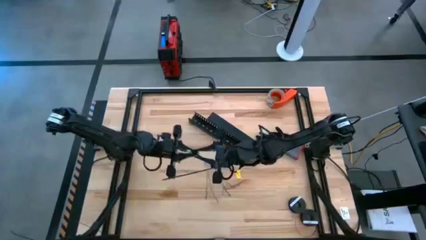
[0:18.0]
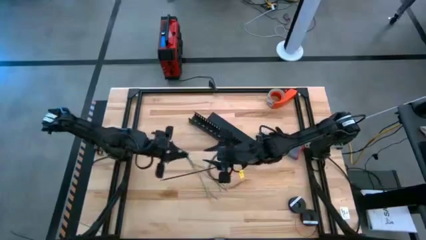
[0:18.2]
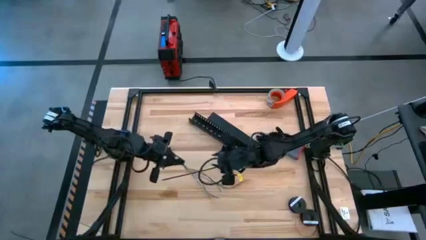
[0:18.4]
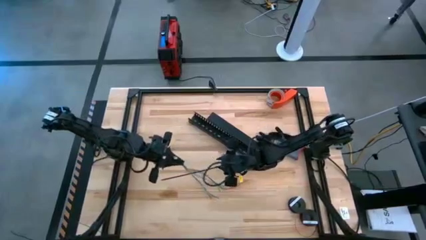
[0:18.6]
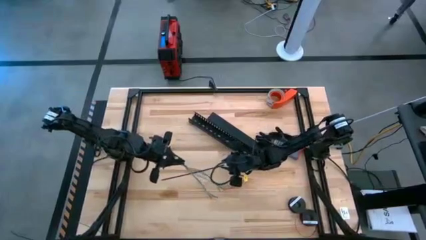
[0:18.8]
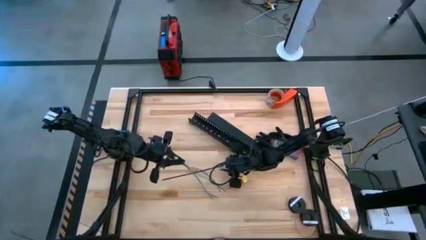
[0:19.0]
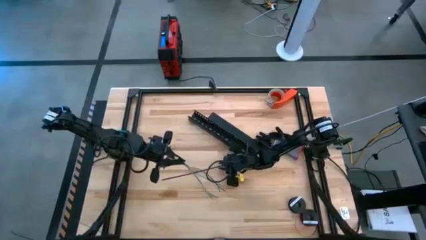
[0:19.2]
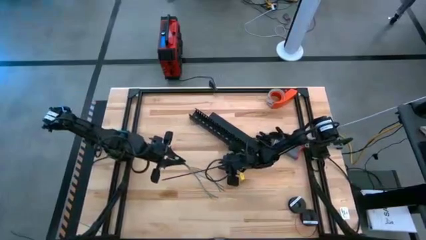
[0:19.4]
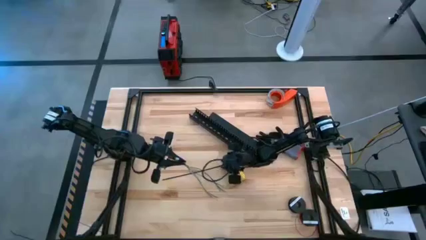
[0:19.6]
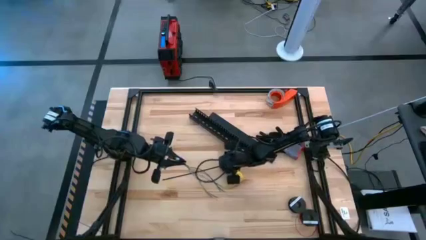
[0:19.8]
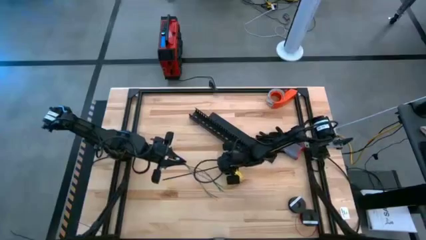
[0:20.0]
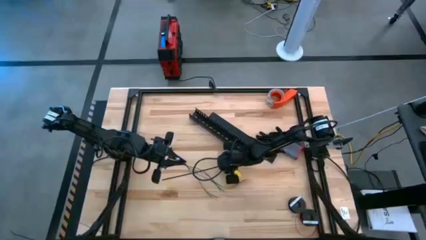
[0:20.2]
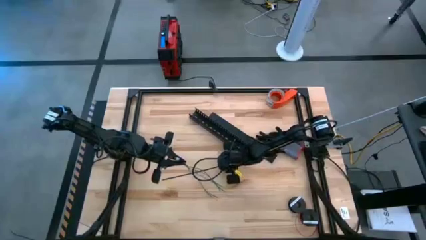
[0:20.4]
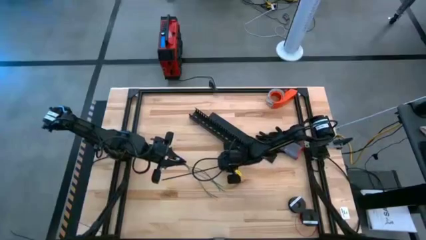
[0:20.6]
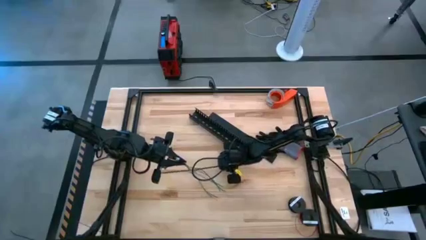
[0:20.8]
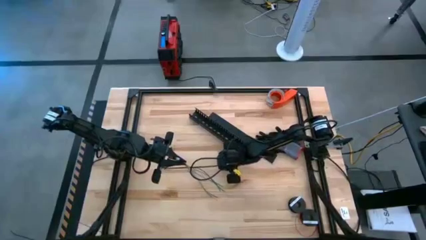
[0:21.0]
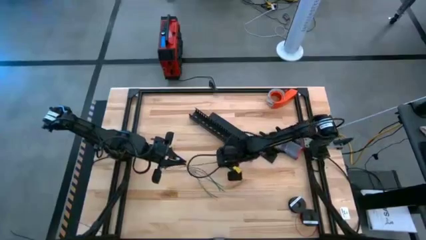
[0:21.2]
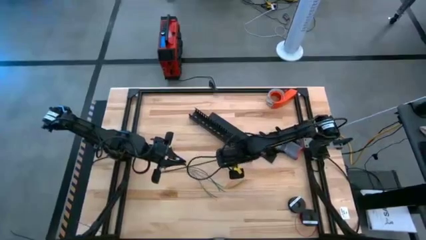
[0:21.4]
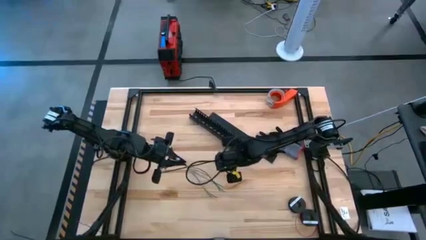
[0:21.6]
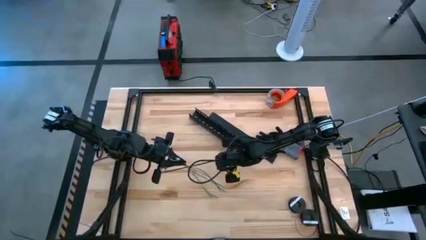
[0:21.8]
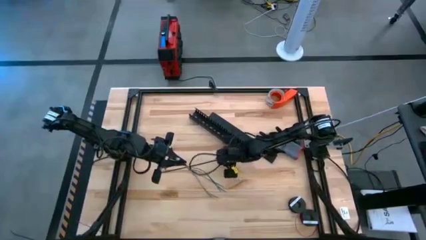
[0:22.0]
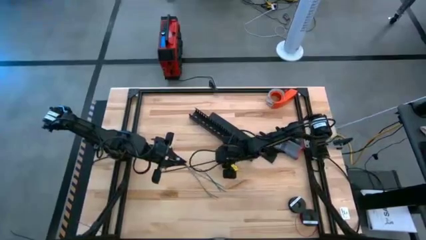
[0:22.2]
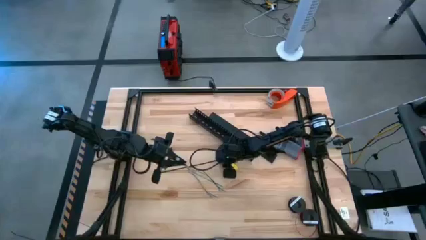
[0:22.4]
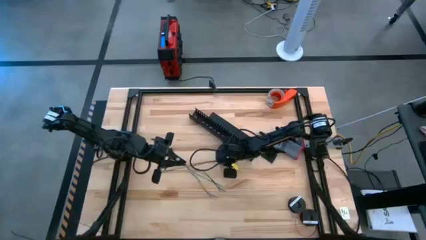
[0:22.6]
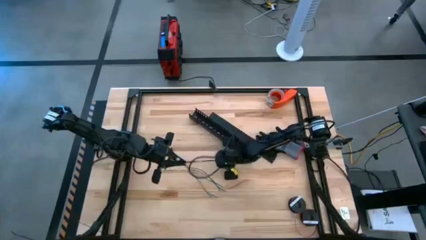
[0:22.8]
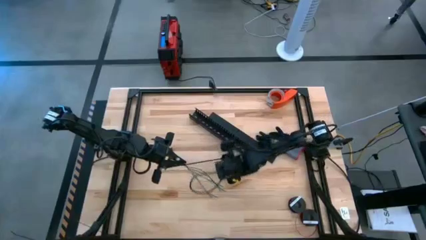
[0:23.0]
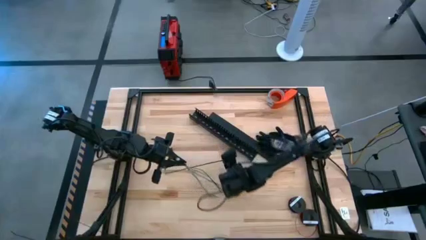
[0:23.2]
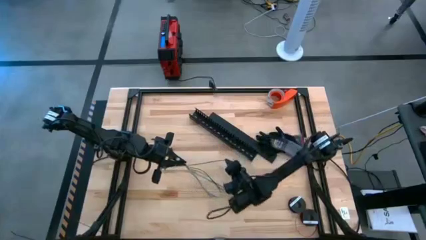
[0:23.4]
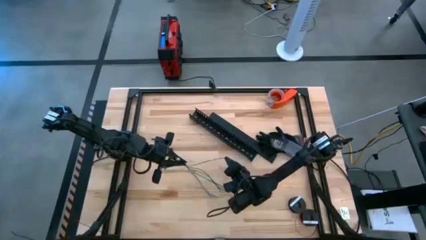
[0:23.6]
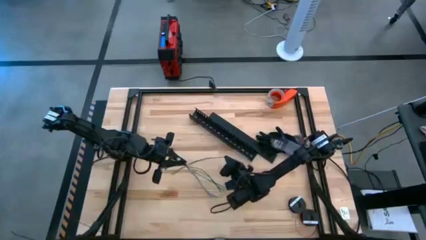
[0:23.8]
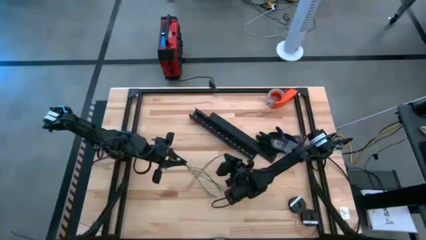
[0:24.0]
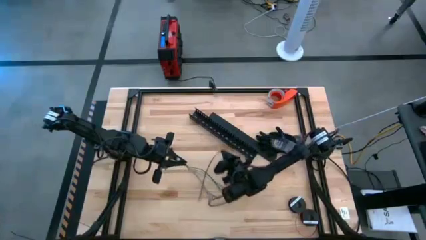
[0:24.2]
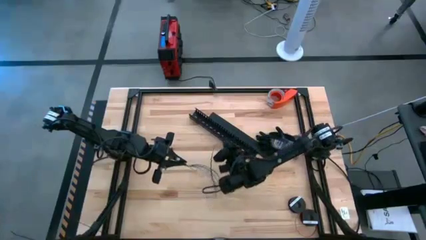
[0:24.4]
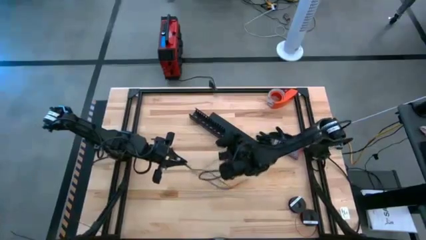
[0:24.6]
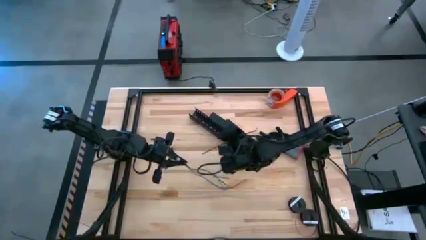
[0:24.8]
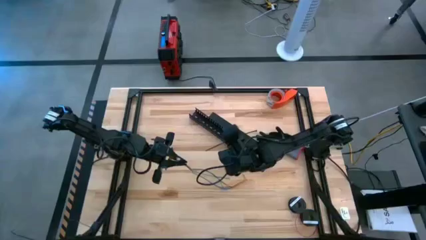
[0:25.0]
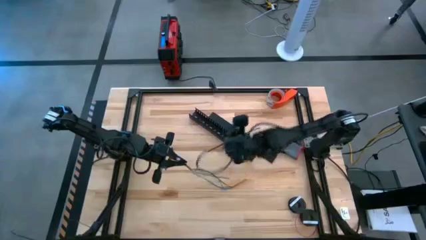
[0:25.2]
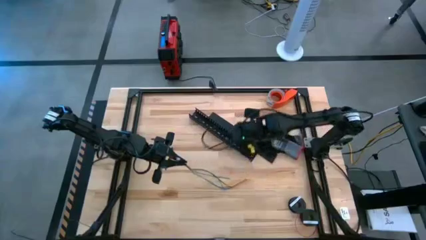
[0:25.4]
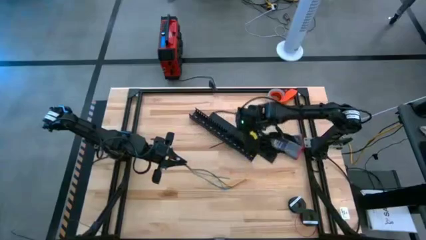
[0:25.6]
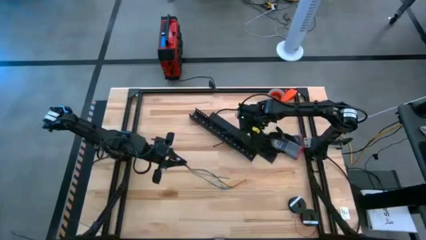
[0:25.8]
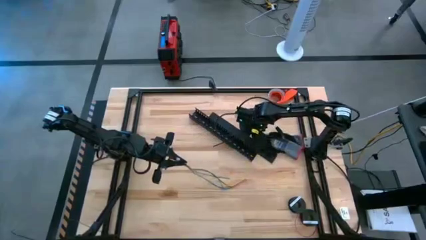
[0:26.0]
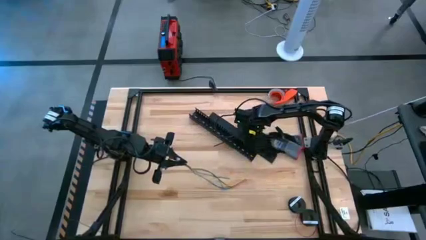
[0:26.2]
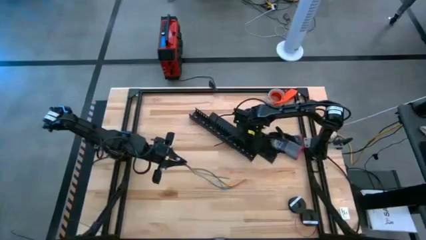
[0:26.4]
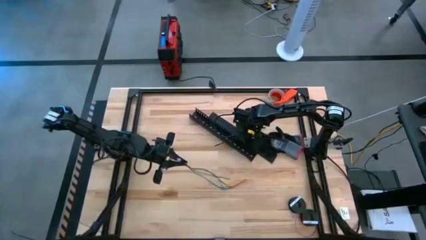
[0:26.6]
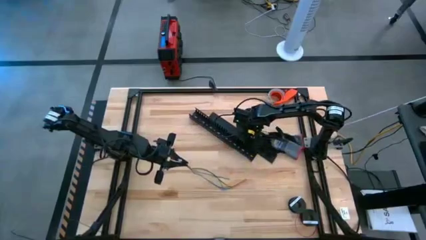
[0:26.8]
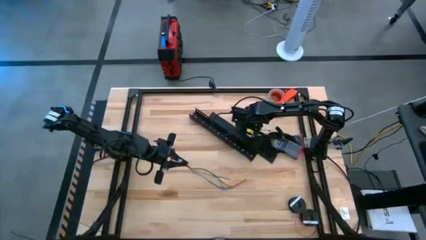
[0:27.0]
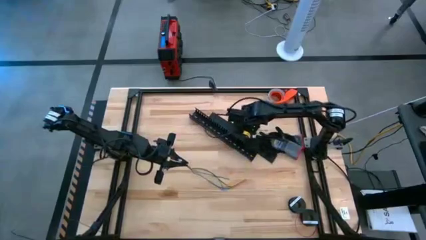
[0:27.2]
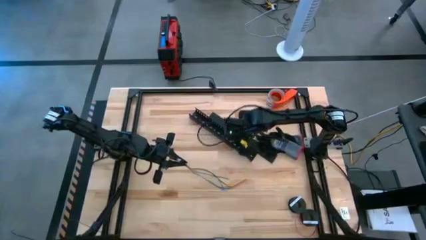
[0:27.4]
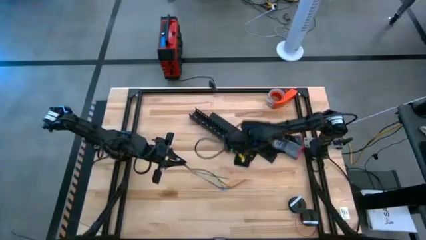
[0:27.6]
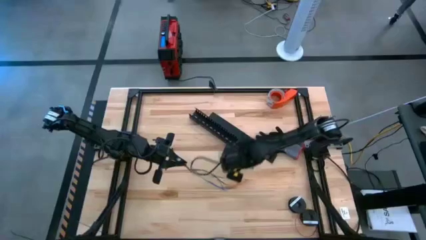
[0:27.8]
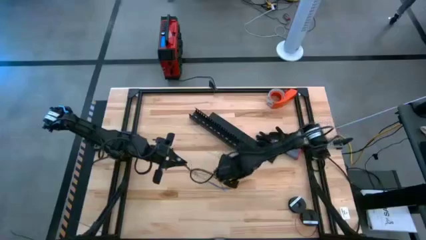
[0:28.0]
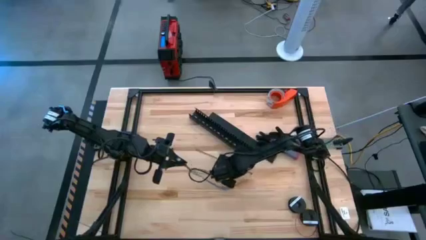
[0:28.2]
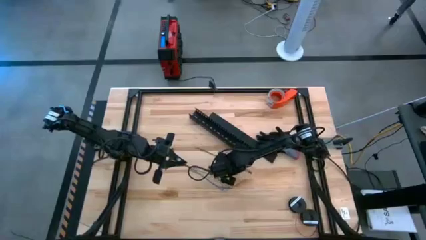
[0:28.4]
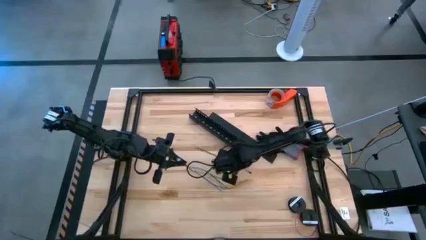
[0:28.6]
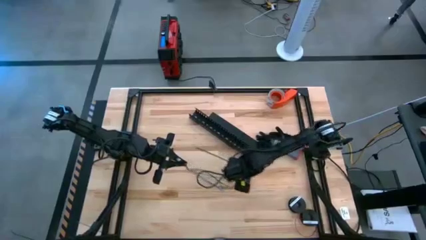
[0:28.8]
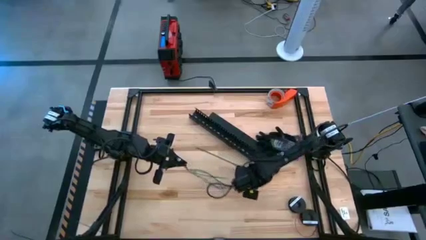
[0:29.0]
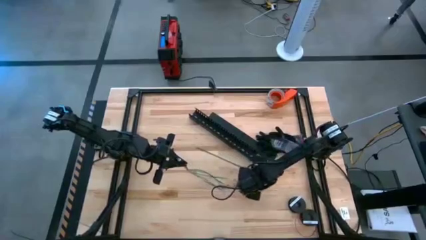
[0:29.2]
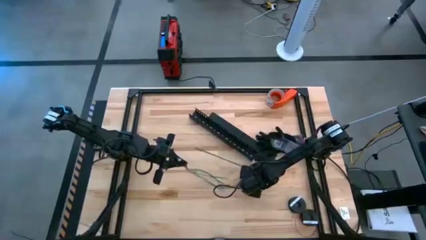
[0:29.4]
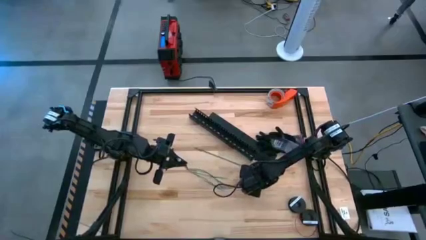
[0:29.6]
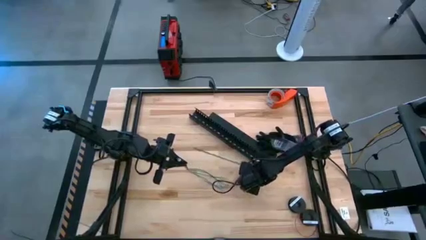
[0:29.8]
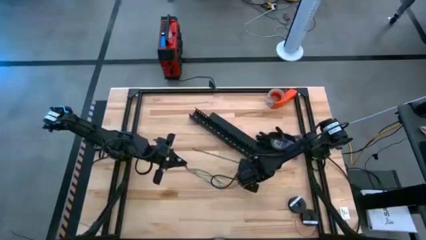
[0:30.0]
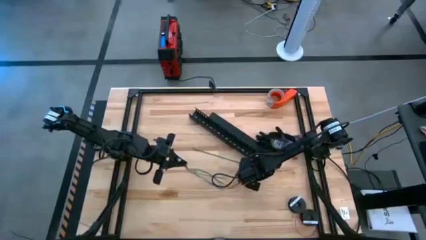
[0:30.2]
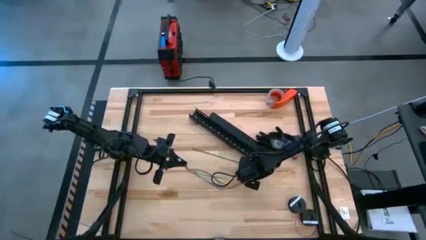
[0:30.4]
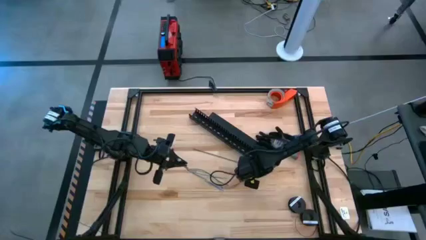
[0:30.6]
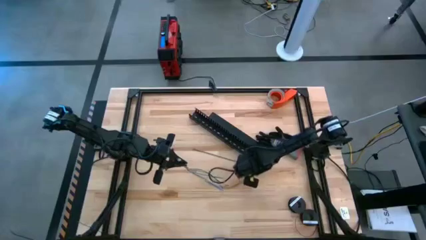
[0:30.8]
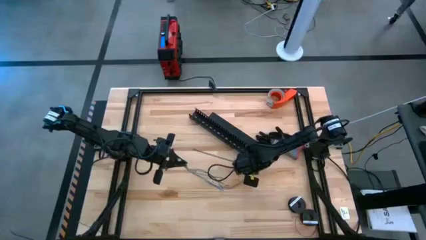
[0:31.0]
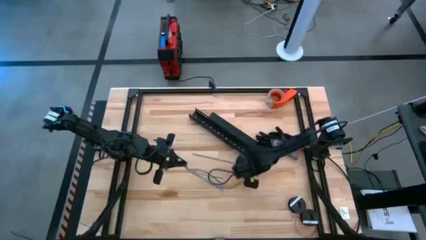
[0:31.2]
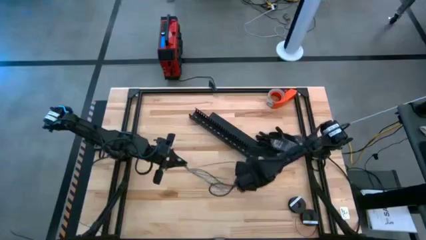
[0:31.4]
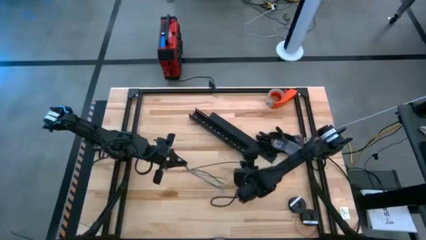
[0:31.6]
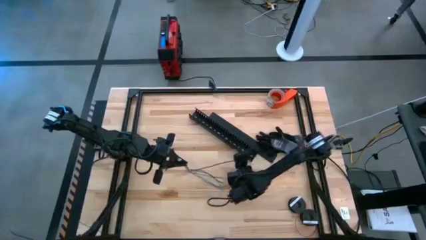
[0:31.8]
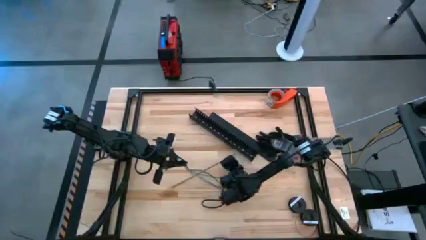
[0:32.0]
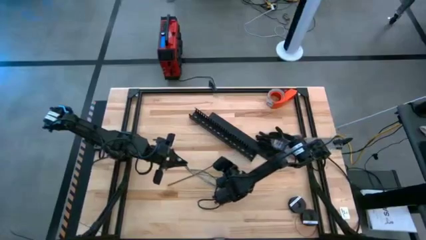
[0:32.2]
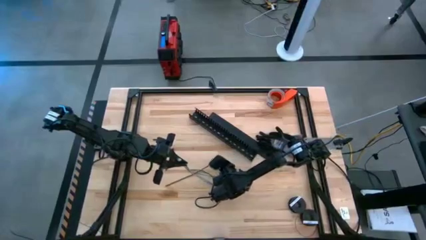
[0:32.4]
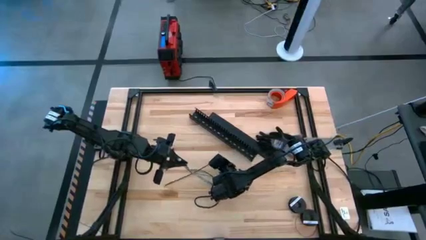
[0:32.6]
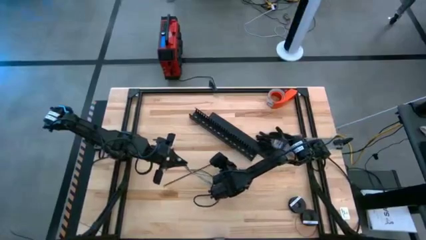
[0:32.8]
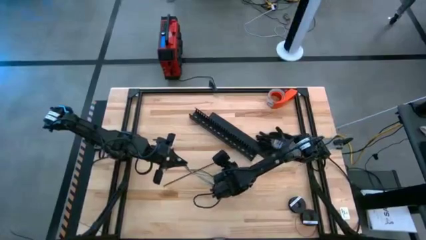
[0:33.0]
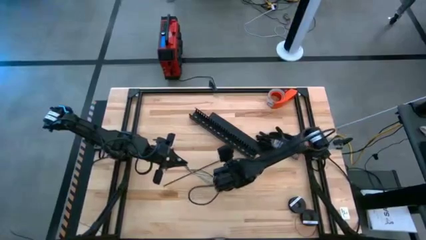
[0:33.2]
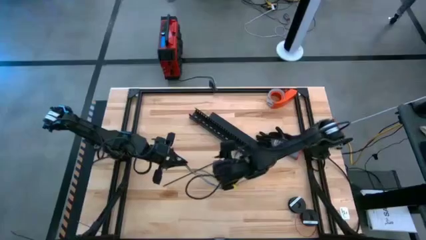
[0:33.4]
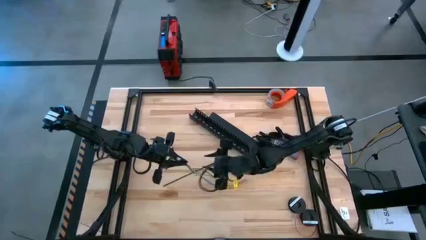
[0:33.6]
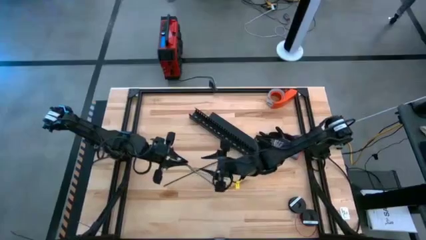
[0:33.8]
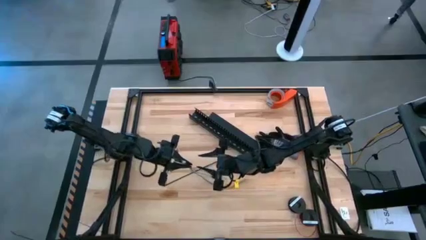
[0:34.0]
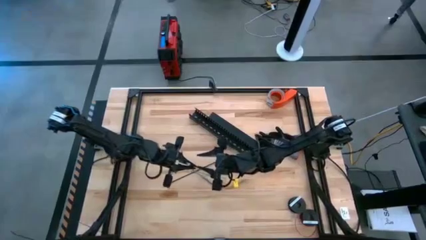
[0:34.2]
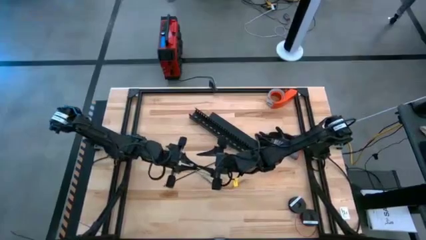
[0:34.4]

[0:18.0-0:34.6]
Task: Ziptie cables
Wrap the zip tie around the cable bundle
